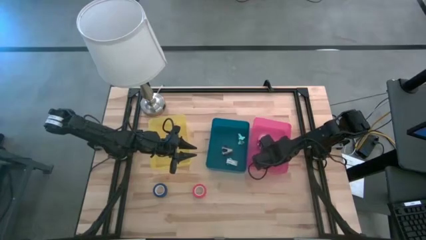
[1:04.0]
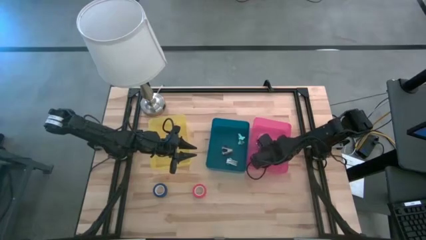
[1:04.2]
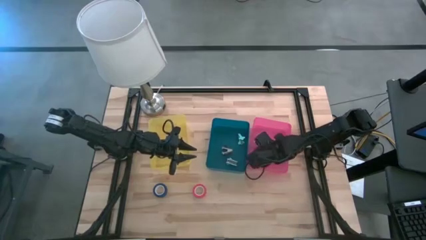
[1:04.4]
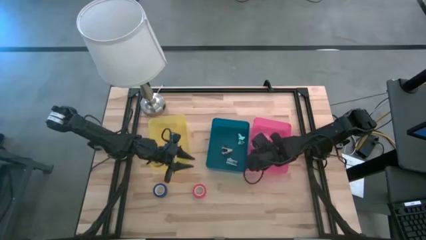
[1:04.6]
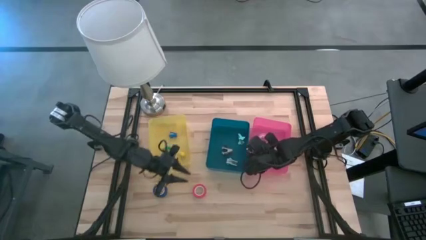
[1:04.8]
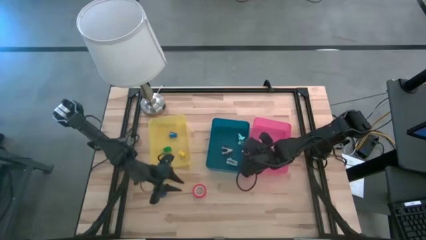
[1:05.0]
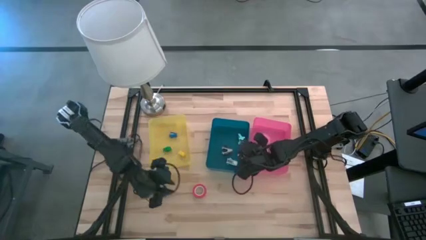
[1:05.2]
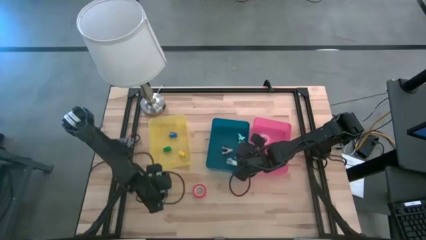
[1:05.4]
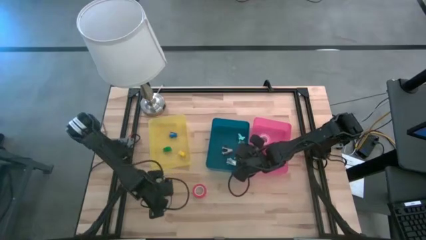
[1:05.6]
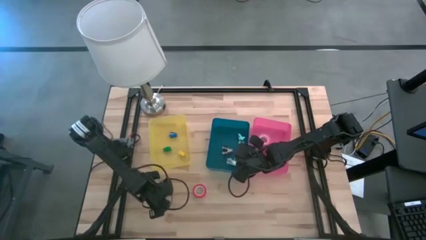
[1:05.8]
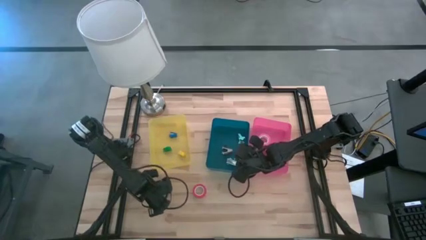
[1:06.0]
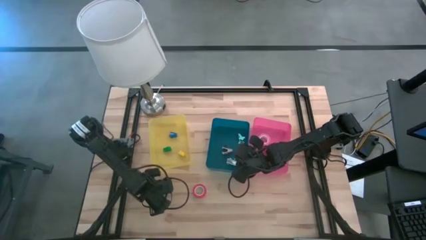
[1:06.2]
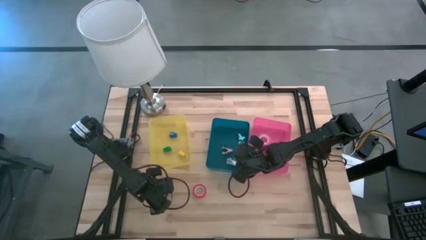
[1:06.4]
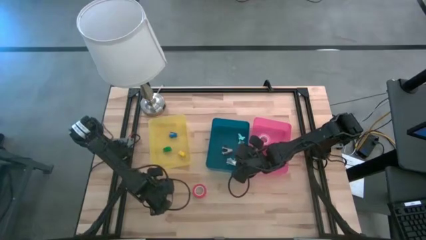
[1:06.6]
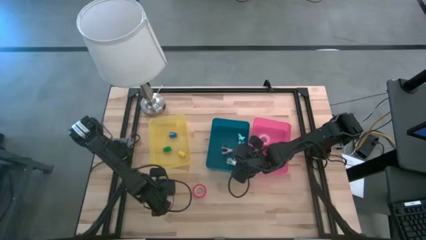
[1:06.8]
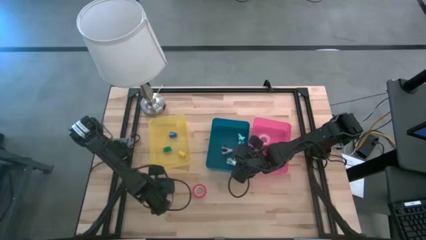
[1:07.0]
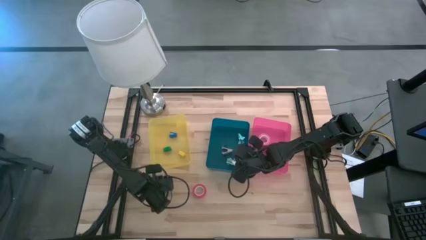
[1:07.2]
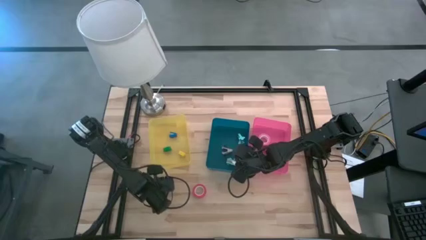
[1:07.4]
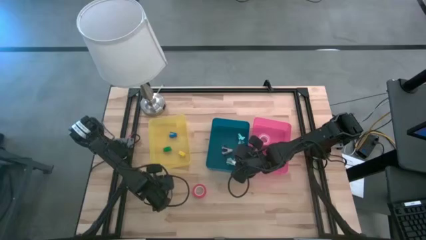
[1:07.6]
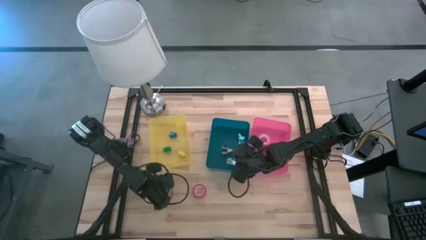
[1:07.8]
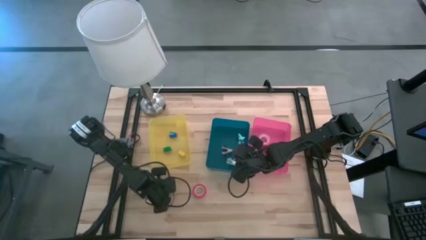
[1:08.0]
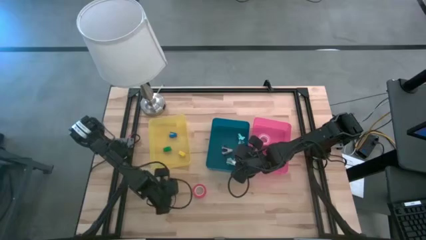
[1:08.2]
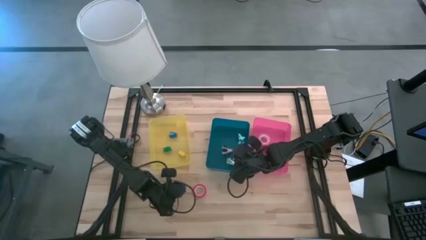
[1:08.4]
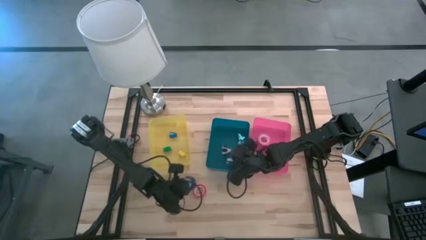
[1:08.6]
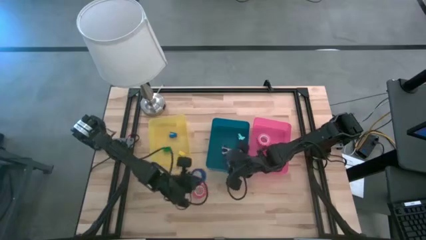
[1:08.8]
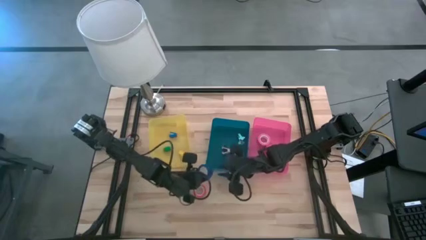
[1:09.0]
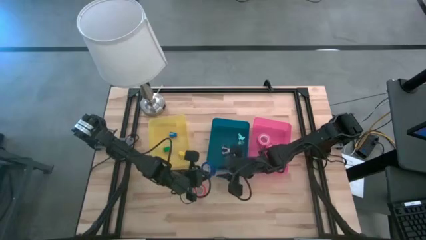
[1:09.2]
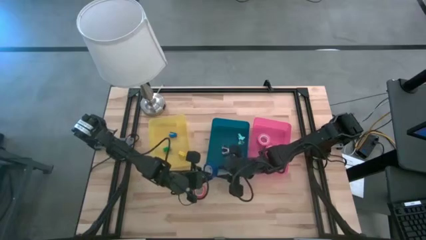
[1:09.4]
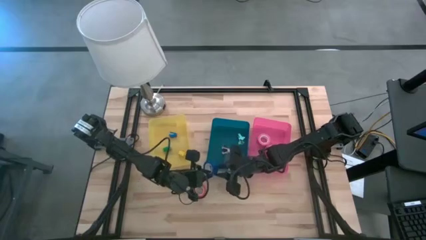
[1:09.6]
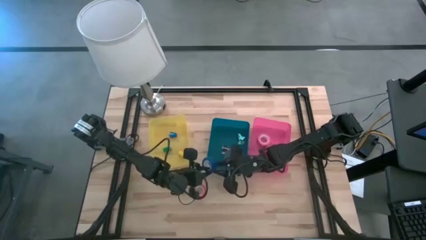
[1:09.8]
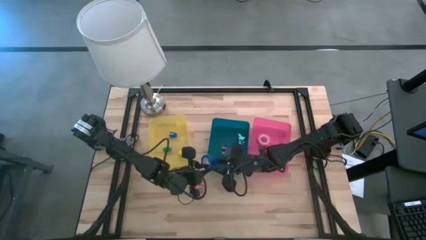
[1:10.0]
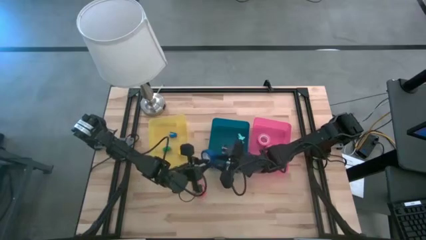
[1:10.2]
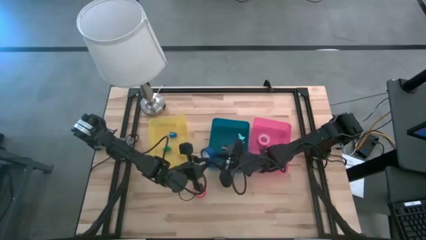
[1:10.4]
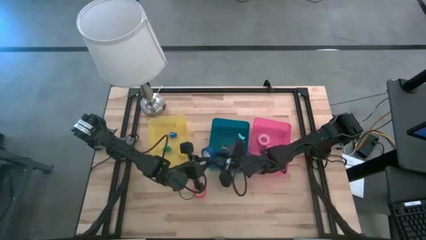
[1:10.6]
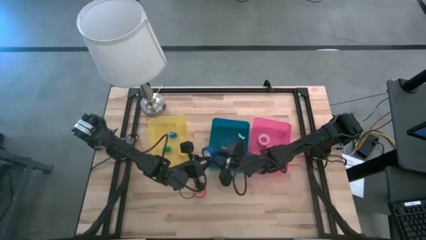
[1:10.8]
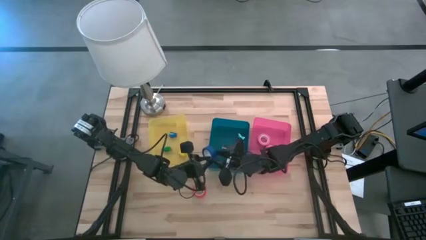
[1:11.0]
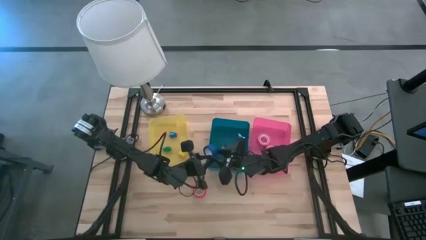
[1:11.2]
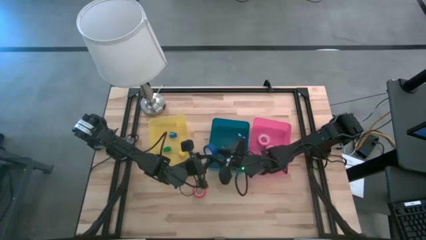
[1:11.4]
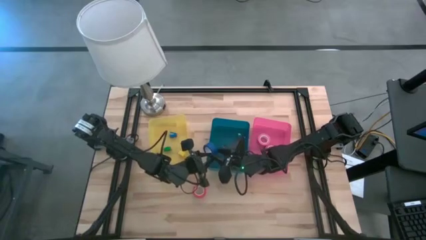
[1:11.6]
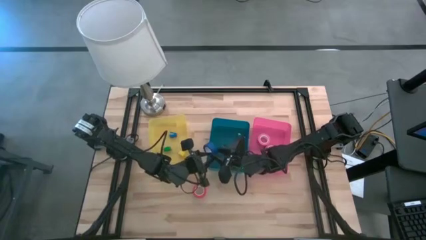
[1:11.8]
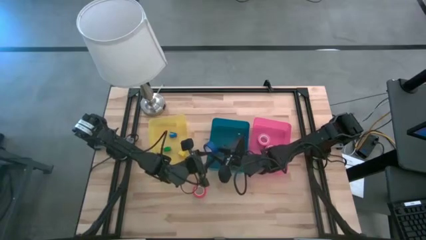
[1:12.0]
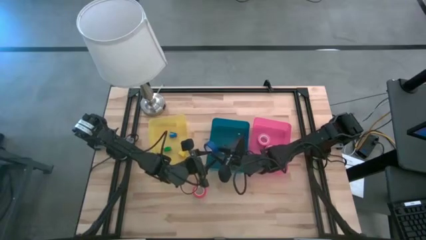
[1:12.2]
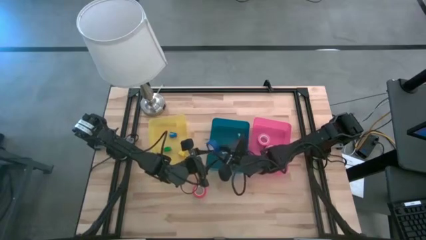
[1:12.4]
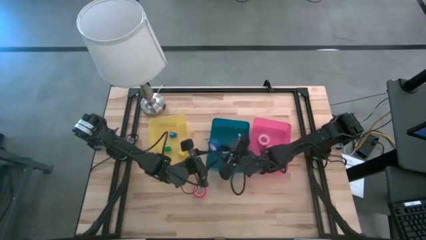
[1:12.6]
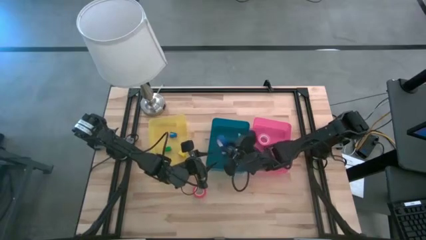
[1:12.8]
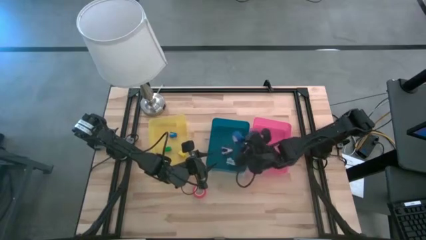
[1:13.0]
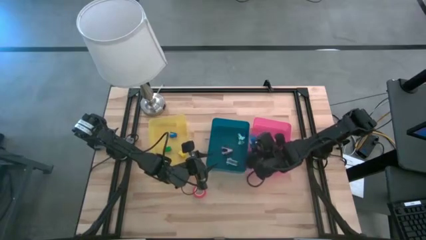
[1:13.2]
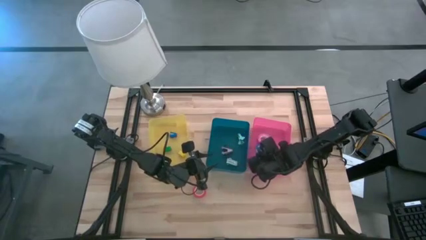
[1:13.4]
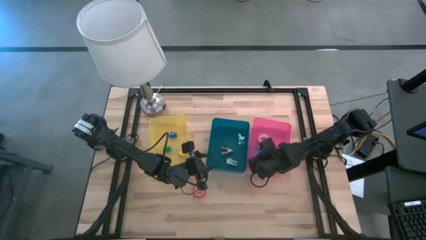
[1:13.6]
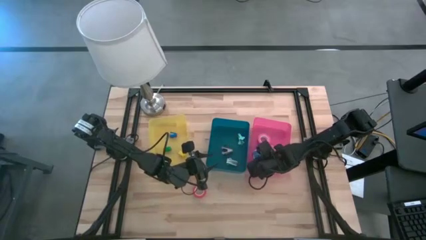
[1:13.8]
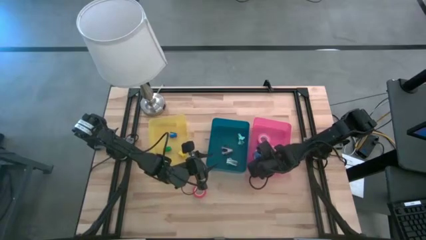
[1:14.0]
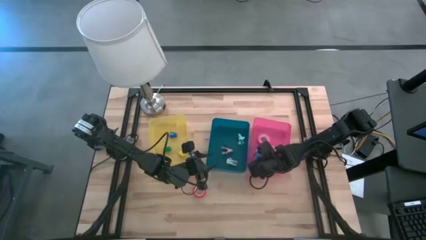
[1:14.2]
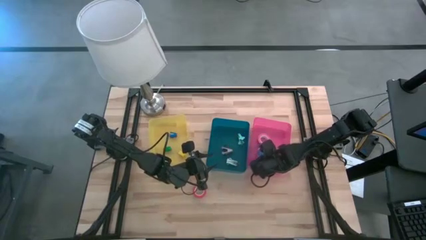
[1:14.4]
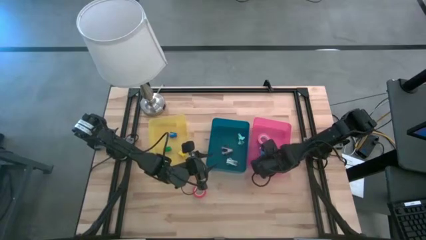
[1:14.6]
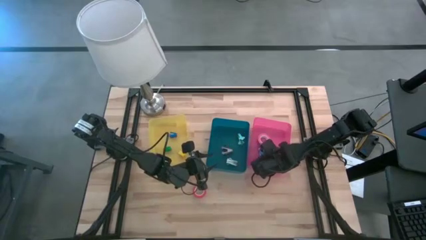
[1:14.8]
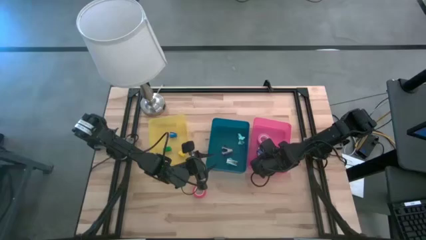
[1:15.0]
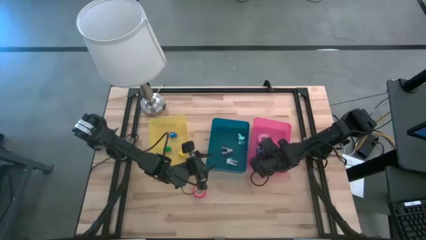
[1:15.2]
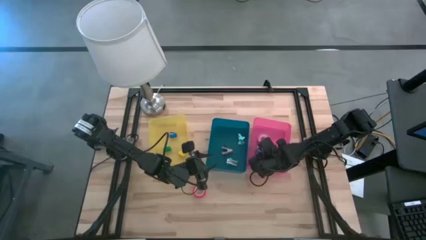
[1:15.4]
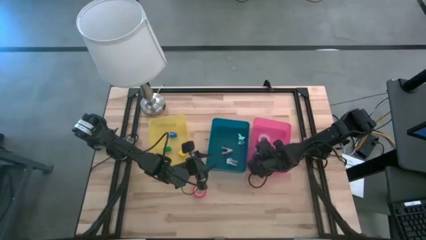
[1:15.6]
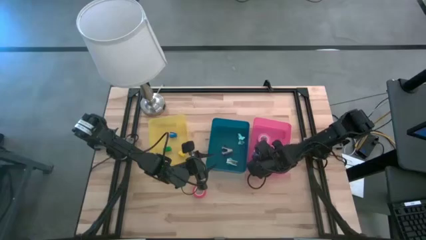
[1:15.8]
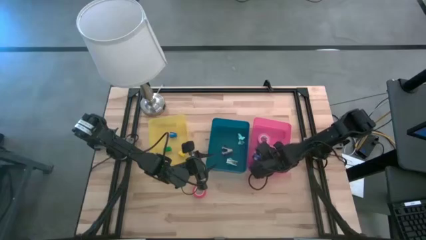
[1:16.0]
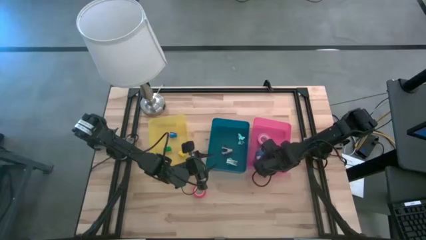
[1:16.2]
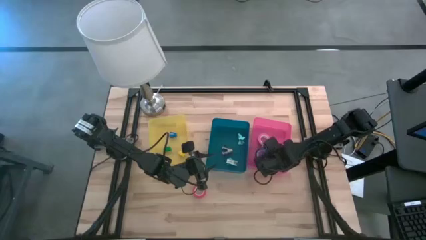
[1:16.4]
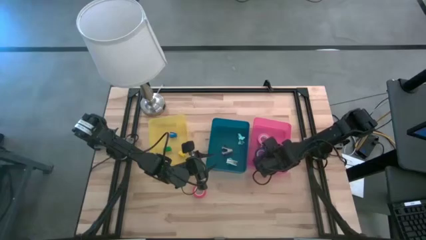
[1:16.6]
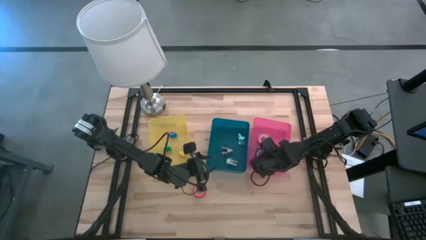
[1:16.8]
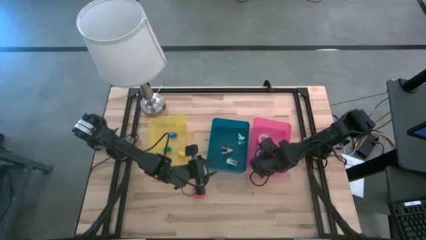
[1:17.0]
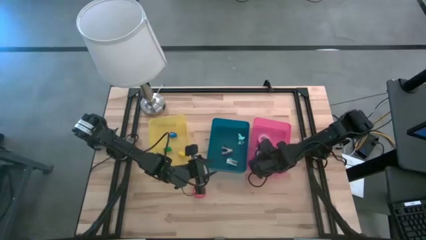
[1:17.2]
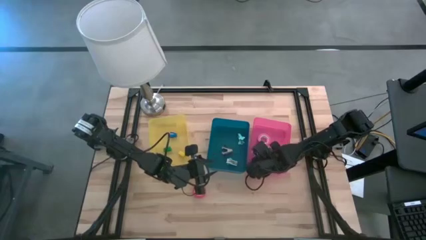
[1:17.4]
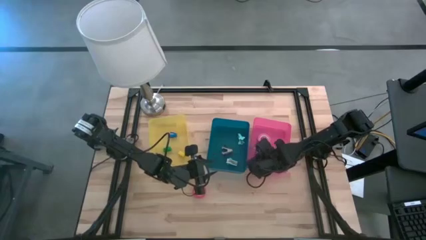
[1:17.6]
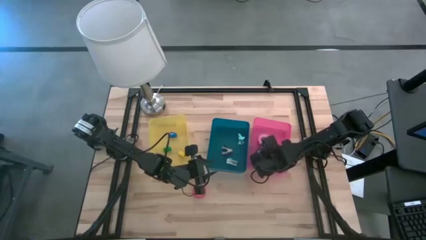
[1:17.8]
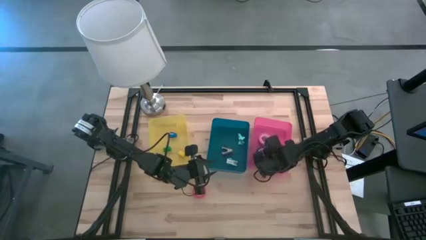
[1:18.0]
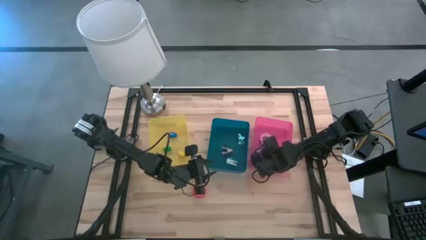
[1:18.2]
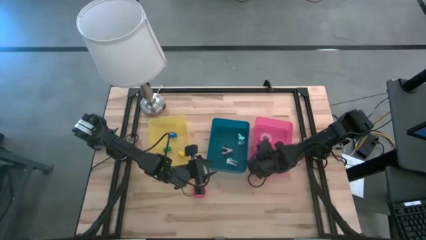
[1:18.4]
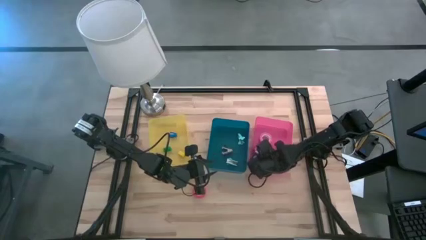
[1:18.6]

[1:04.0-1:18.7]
Task: Pick and place Stapler, Stapler remover, tape
Put the blue tape into the pink bin

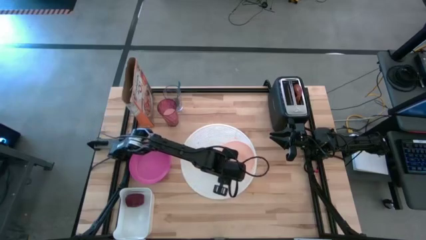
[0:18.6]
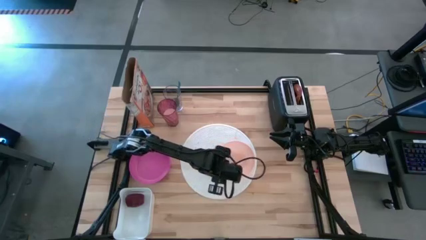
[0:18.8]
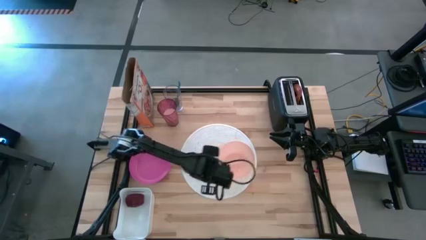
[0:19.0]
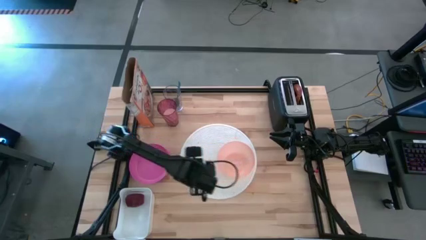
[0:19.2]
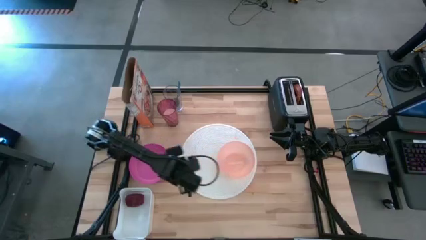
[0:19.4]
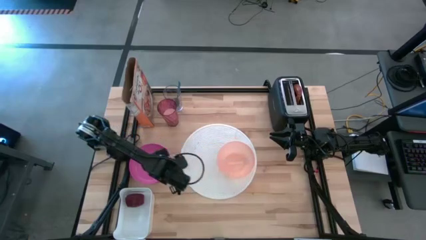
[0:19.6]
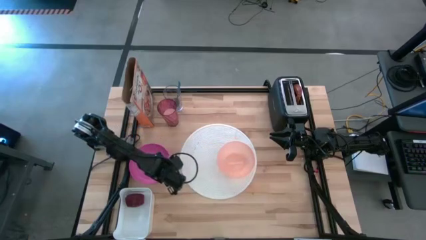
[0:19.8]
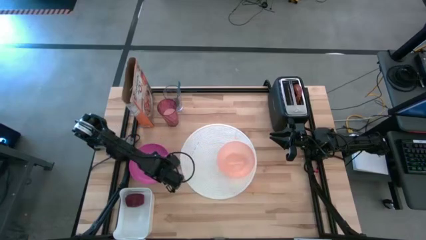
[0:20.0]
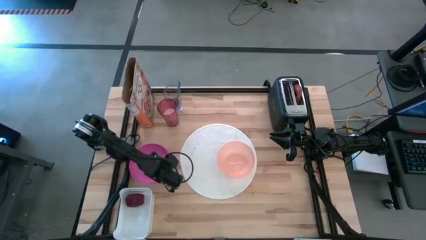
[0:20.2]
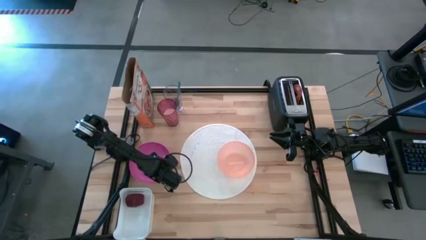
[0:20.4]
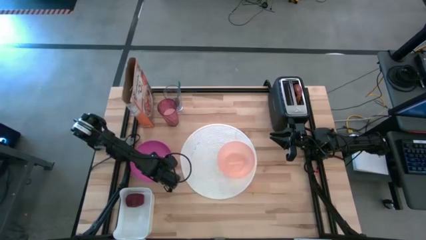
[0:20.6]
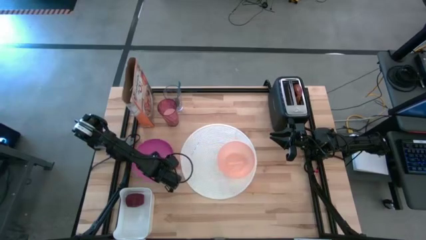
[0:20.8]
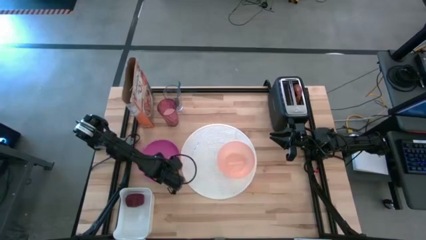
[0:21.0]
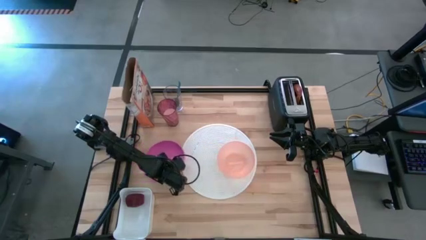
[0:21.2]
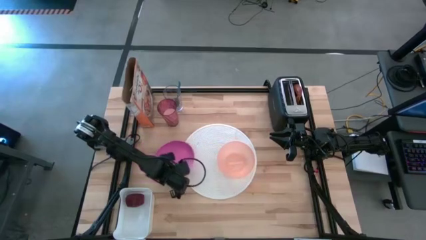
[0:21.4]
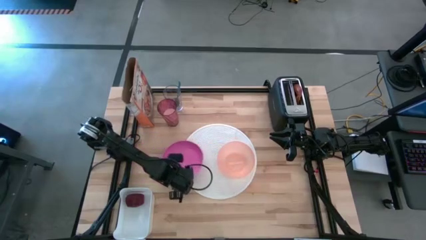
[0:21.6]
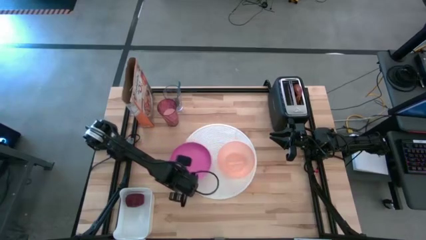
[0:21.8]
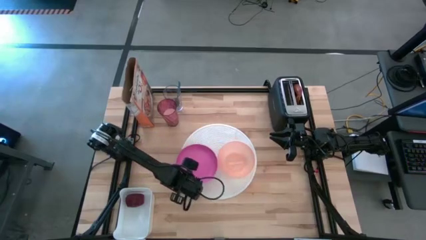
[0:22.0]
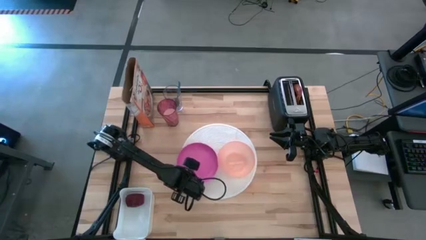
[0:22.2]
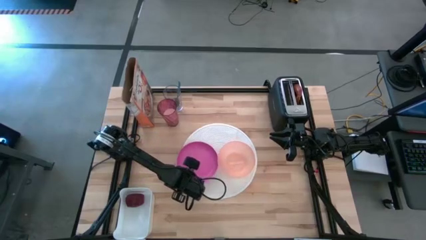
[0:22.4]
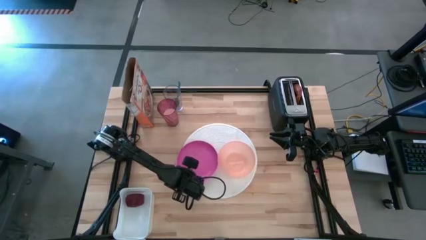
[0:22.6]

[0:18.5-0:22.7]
Task: Arrange a breakfast setting
Put the pink plate beside the orange bowl on the white placemat
